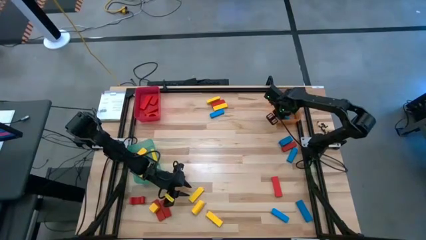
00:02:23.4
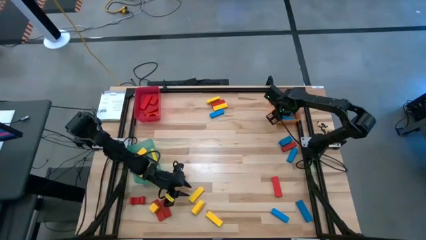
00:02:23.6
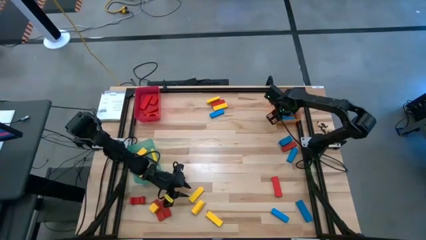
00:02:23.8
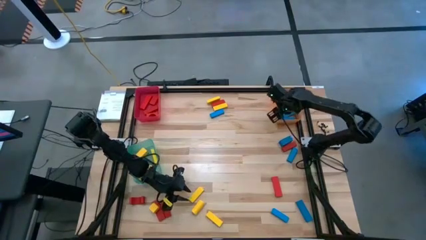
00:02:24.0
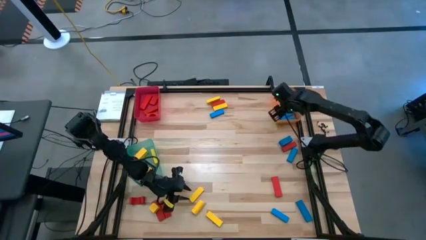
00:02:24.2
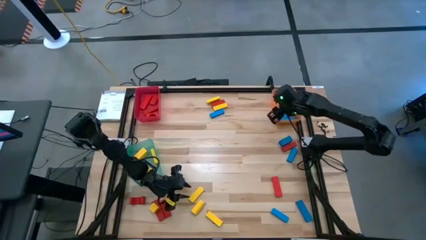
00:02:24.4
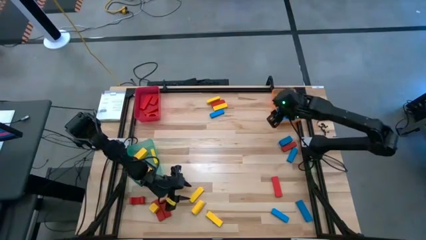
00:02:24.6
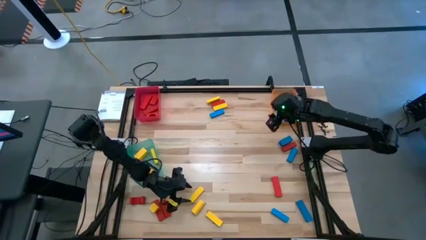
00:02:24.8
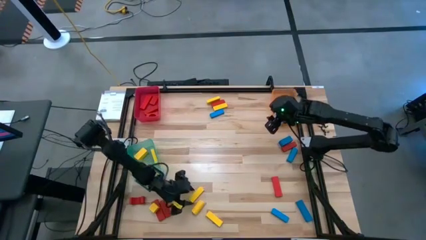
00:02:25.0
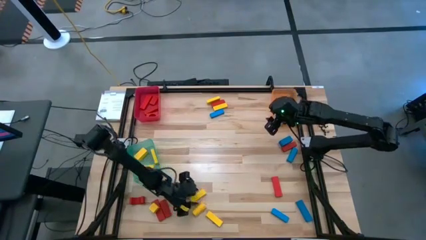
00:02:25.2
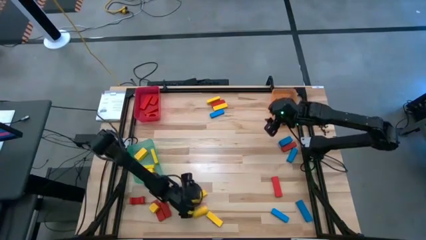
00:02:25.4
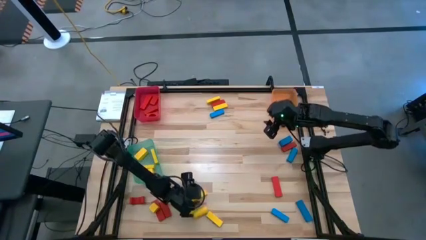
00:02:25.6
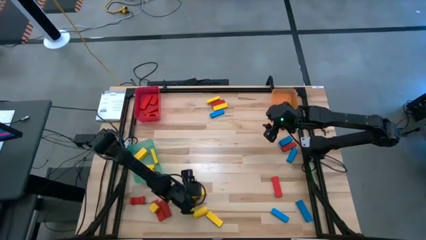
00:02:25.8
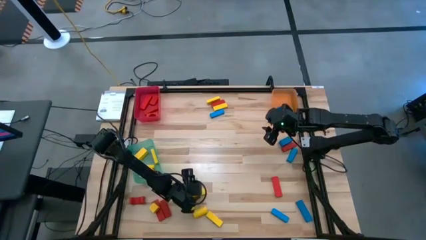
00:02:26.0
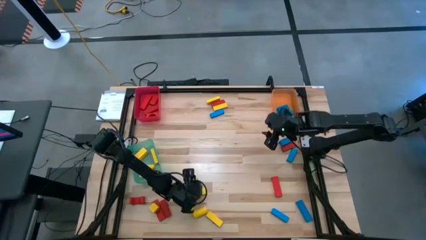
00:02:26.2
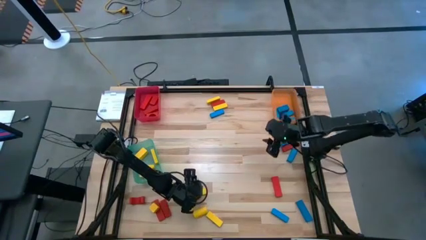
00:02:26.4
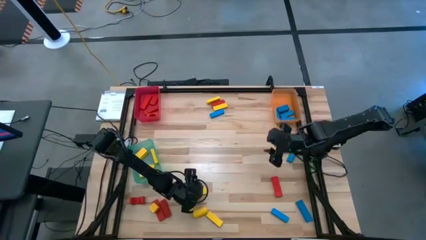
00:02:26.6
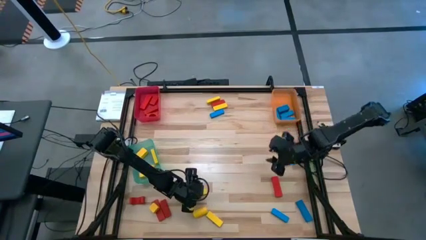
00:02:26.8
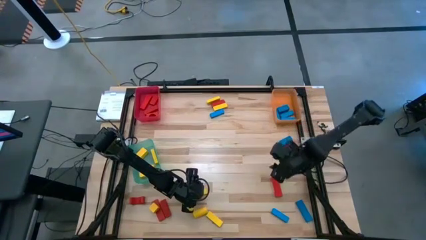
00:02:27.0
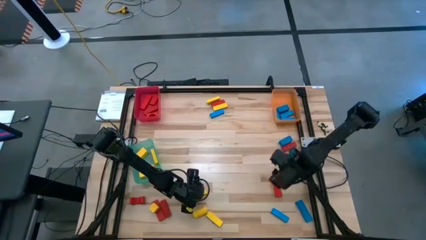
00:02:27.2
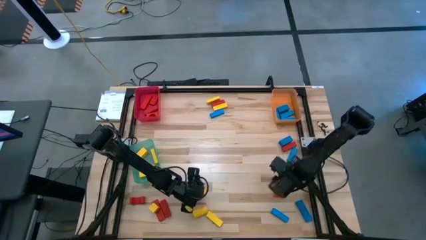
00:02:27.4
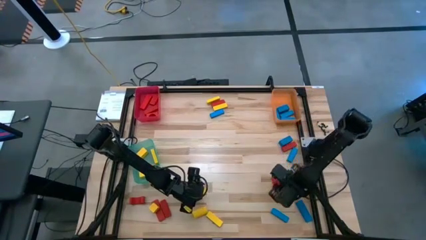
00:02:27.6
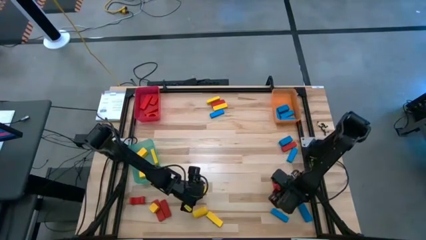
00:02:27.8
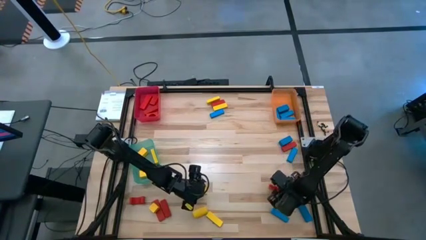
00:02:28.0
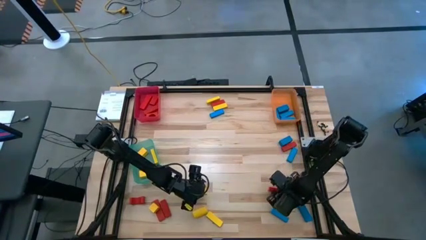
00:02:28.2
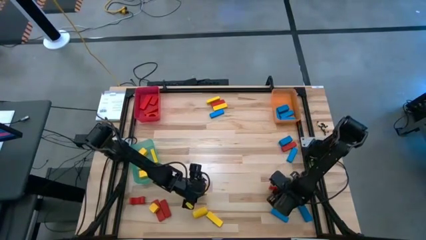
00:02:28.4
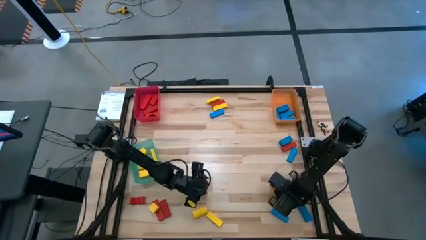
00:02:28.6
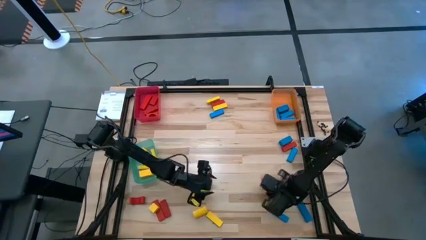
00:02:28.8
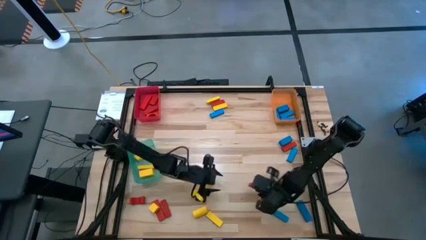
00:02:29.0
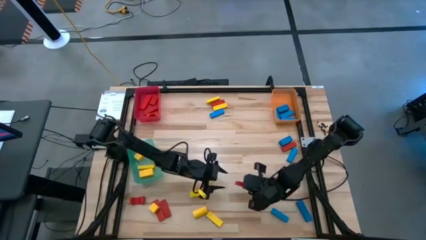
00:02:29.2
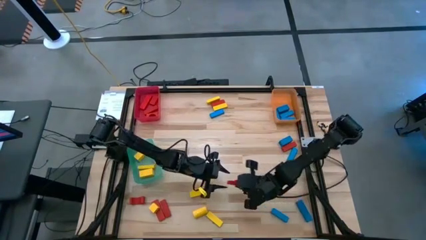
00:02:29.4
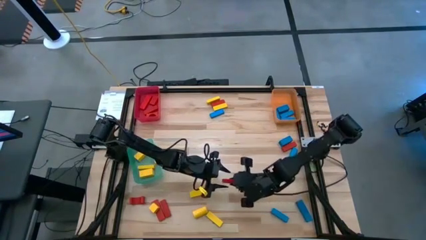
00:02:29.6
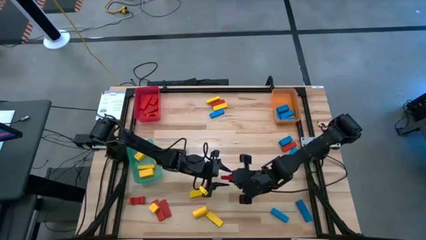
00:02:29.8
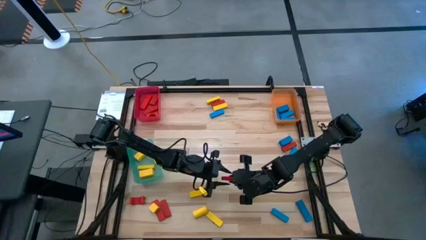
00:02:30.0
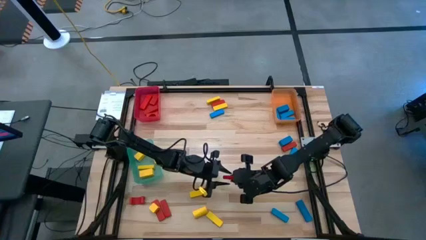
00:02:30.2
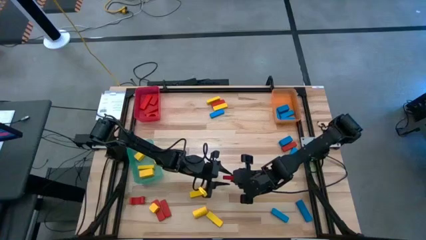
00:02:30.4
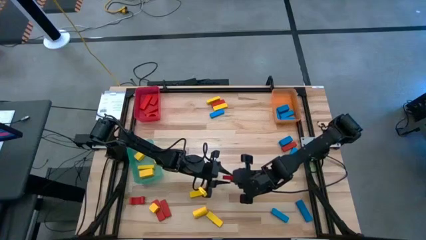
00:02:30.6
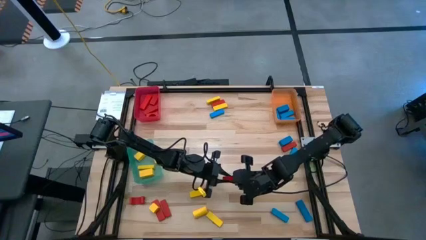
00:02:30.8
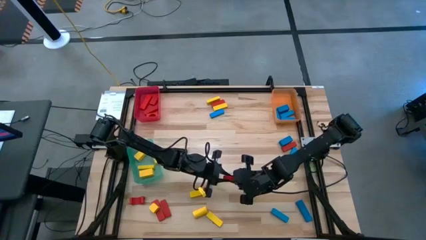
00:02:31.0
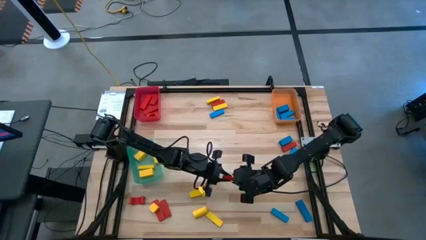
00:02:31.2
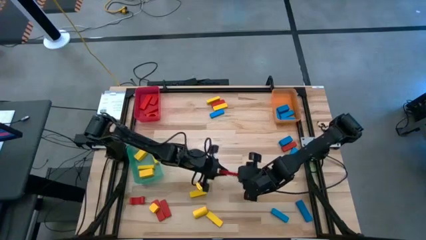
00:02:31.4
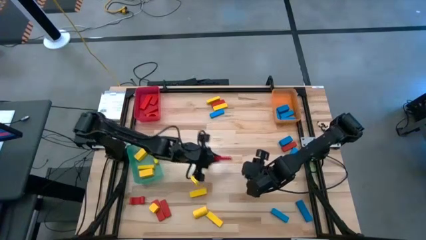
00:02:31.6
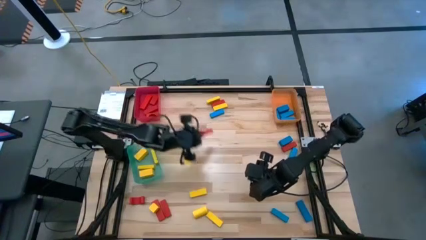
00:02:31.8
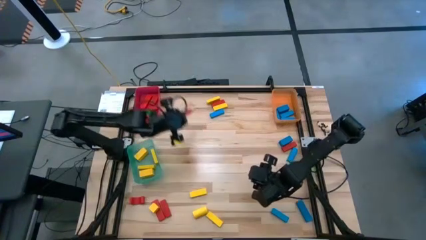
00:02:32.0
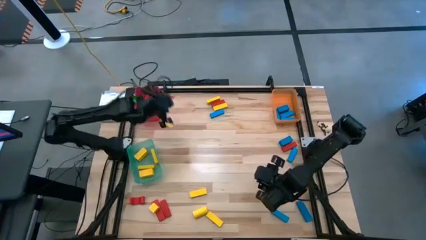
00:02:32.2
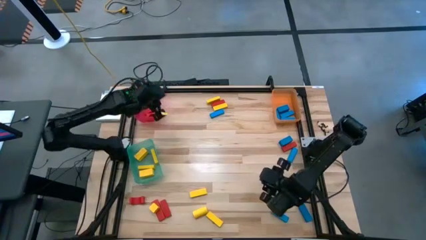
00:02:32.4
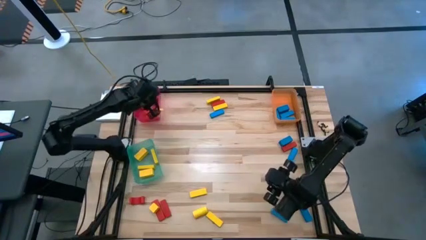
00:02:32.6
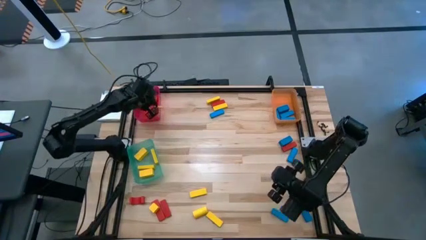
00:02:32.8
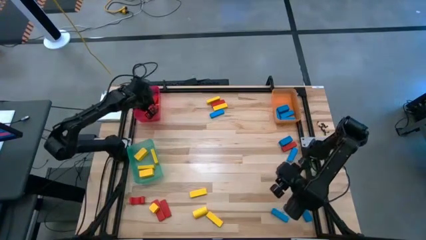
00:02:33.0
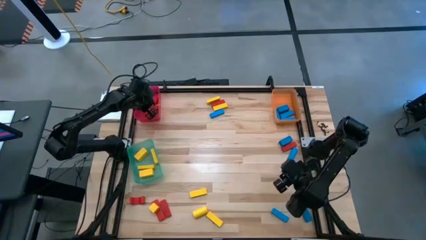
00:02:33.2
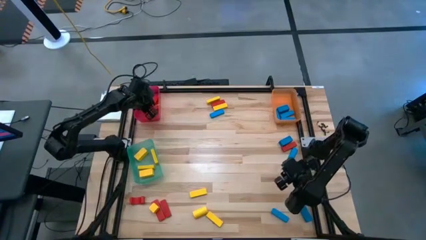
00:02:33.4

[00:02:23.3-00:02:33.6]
Task: Sort blocks
Put the red block into the red bin

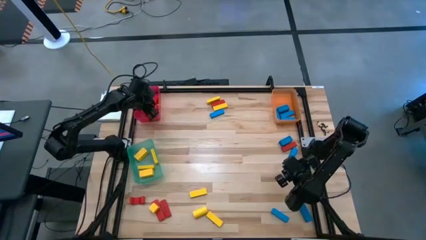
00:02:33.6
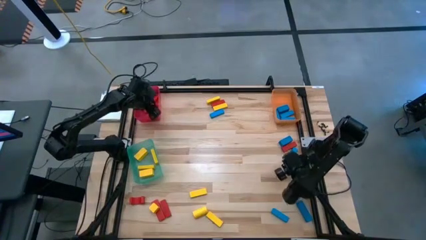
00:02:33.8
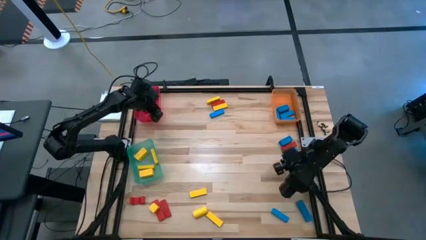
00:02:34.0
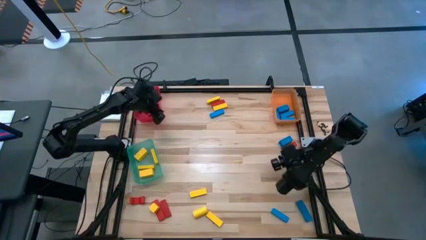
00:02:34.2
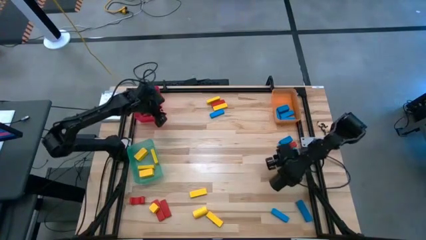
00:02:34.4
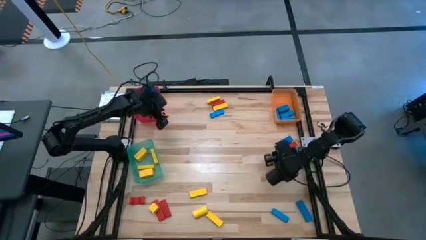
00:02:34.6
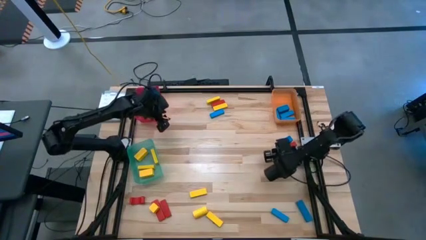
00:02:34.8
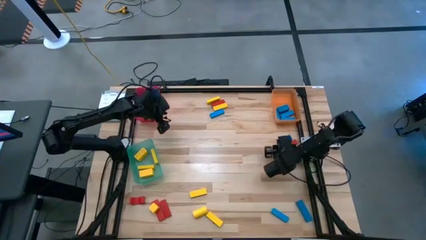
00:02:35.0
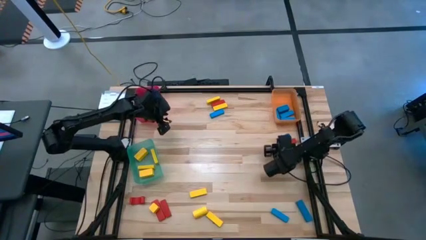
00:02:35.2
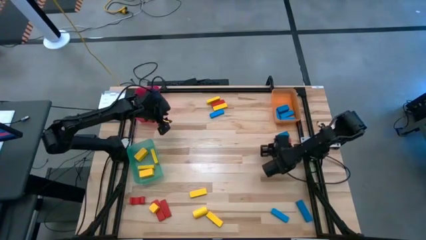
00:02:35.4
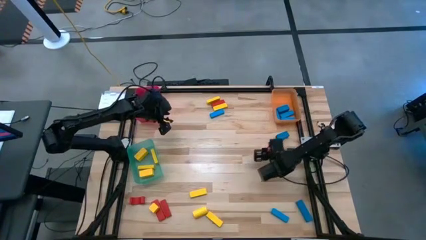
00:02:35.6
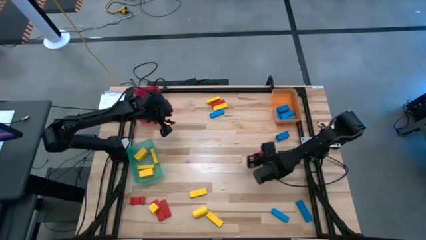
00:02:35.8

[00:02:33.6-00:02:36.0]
Move the red block to the center of the table

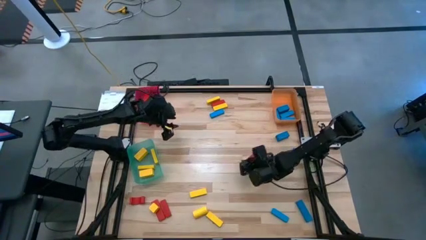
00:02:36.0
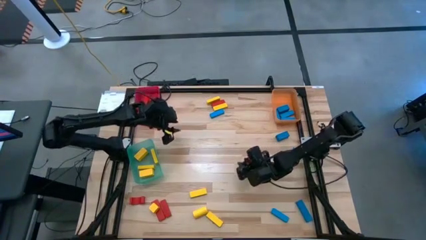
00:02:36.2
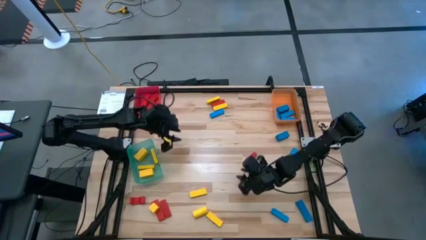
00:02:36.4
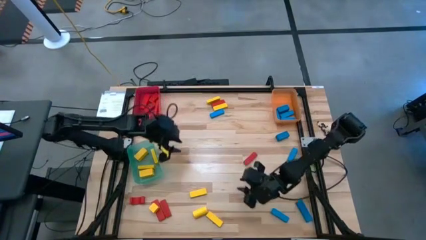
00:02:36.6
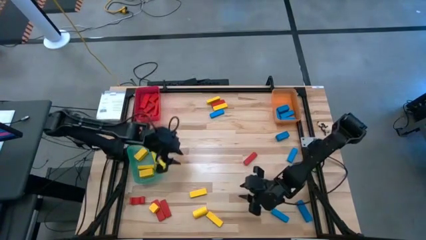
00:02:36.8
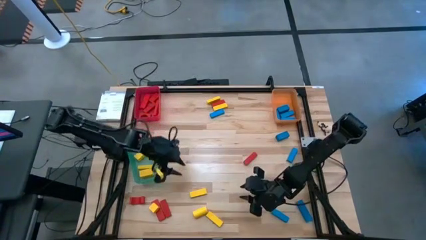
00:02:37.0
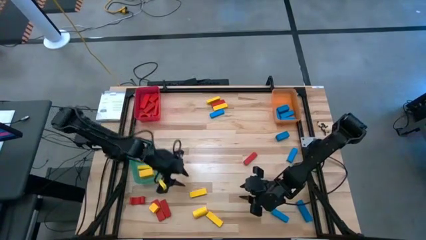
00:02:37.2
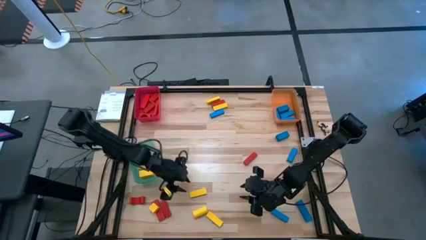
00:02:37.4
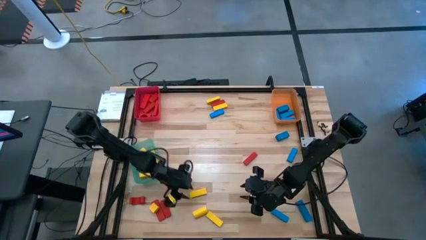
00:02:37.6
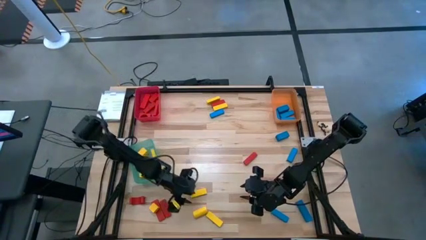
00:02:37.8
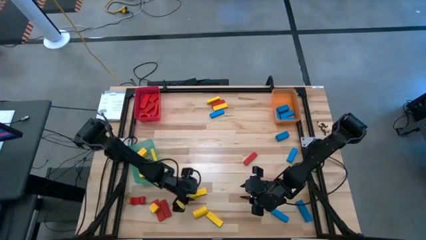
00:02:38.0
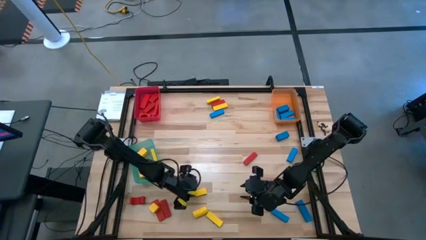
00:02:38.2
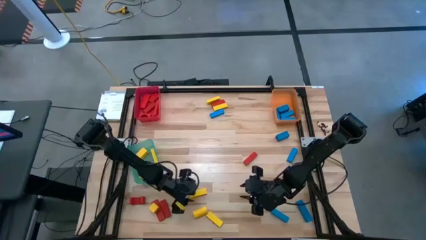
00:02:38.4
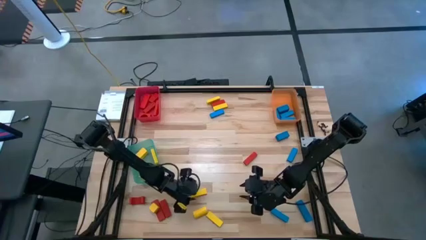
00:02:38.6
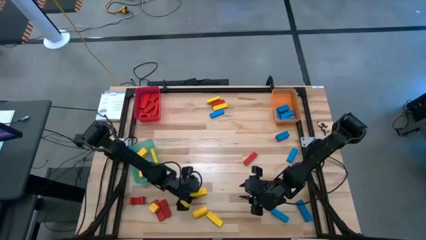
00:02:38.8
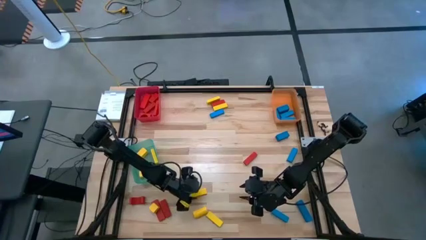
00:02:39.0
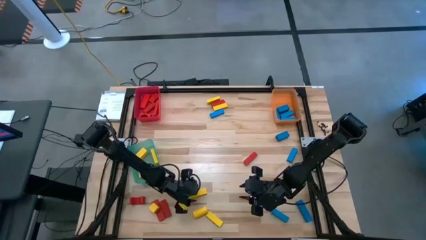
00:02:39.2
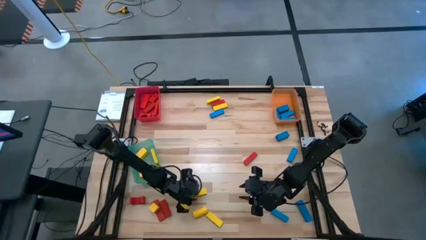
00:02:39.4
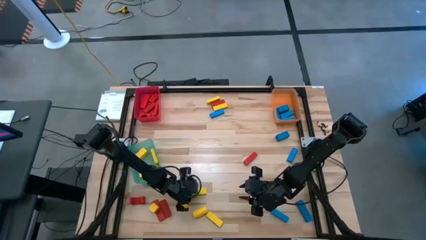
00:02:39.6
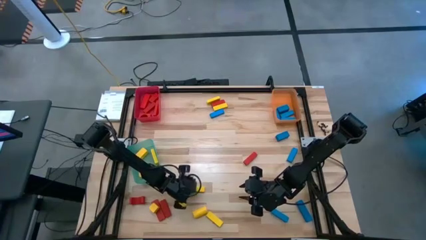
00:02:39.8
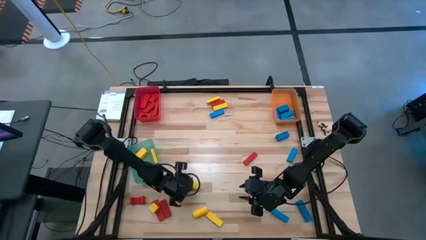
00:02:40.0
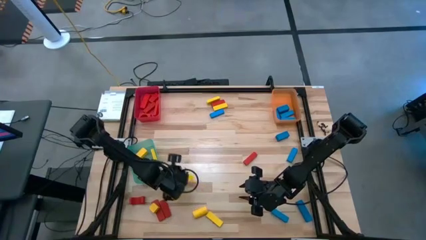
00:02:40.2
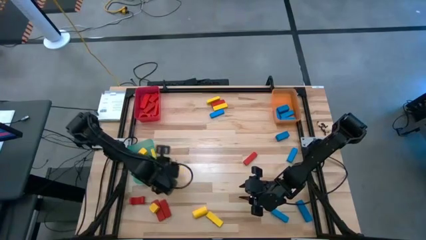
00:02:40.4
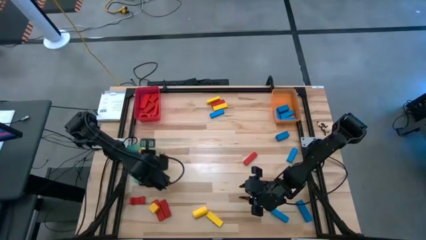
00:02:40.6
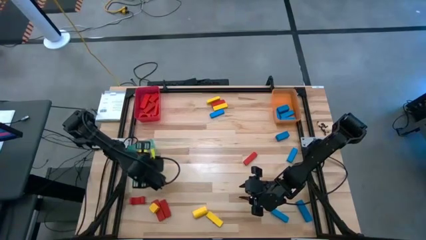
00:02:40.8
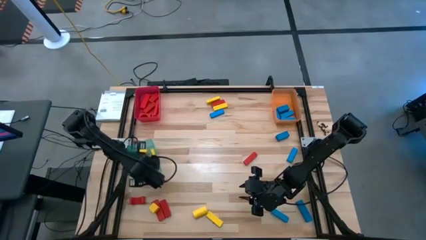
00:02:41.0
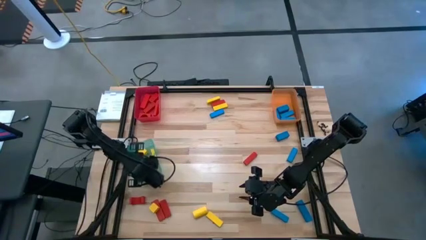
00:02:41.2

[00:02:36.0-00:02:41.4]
Put the yellow block into the green bin
